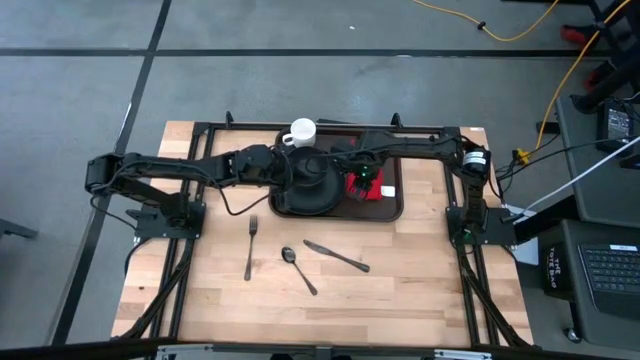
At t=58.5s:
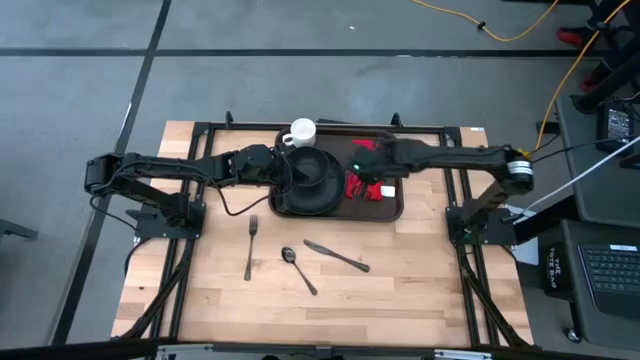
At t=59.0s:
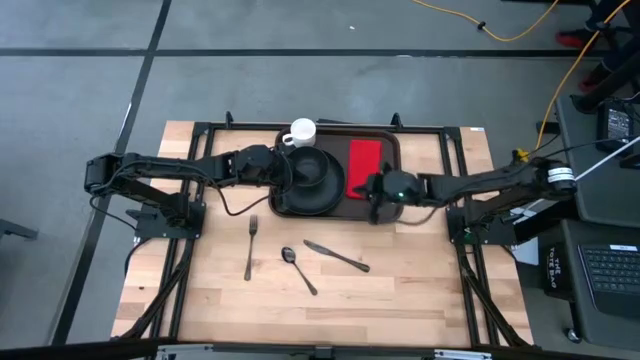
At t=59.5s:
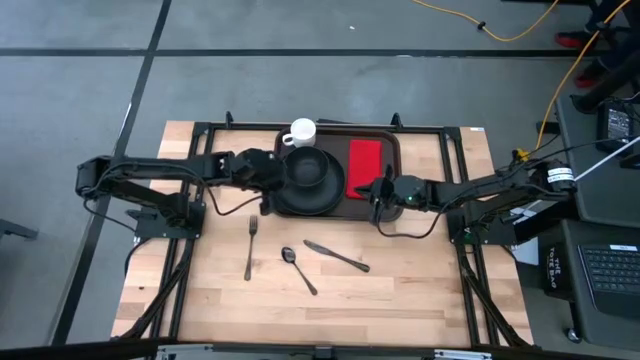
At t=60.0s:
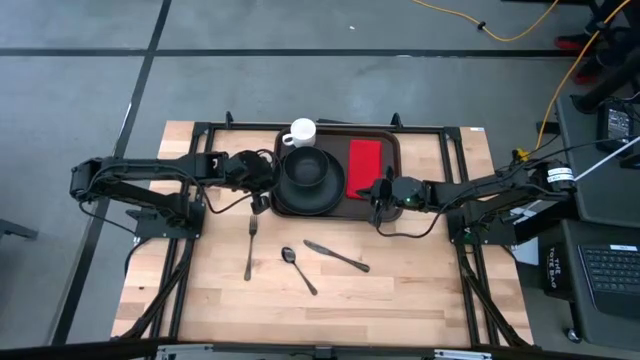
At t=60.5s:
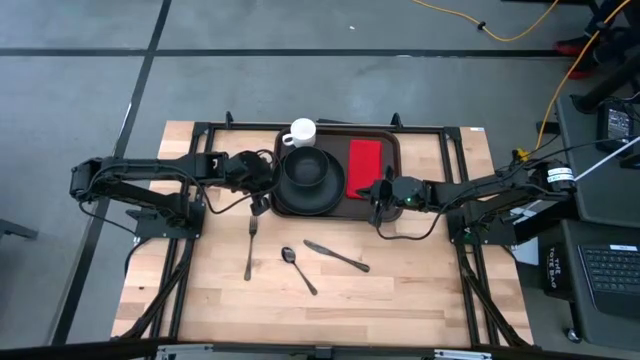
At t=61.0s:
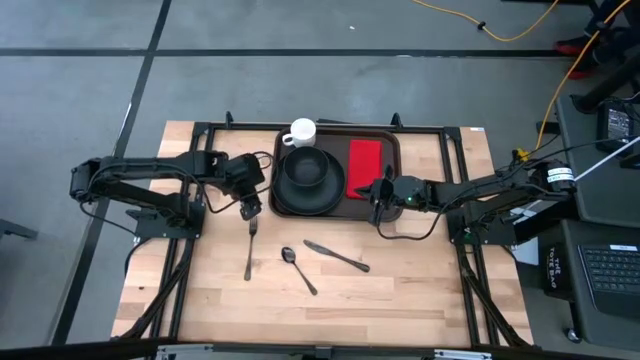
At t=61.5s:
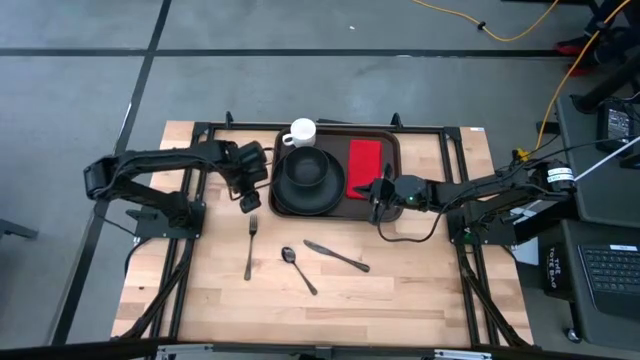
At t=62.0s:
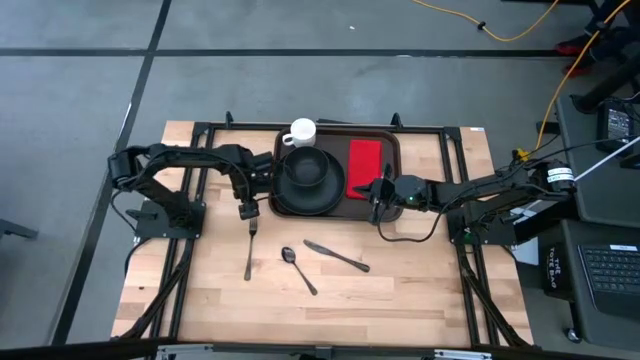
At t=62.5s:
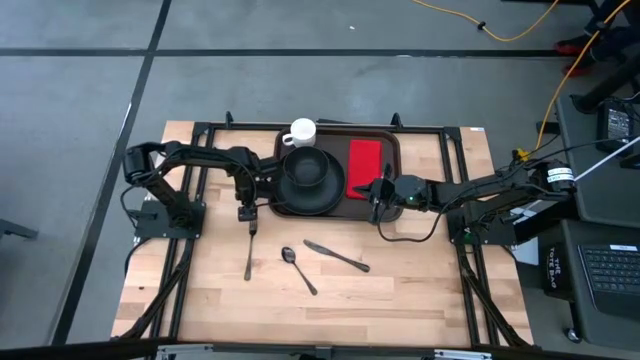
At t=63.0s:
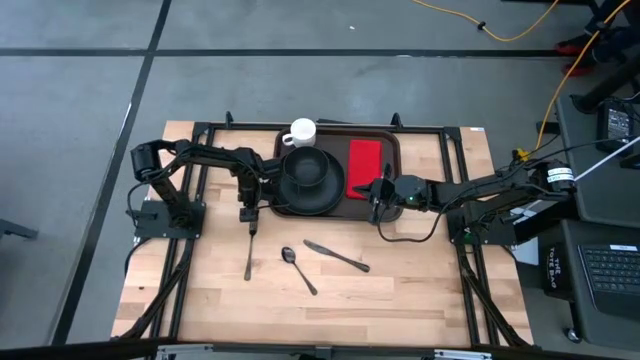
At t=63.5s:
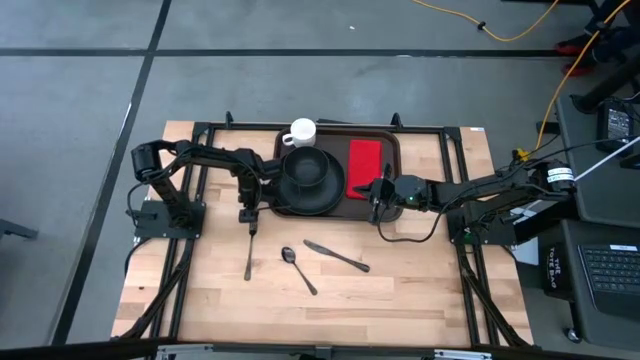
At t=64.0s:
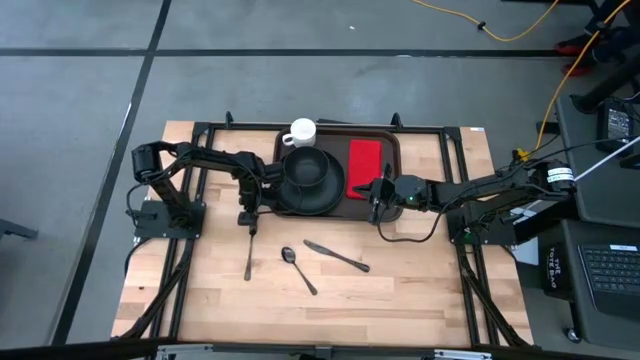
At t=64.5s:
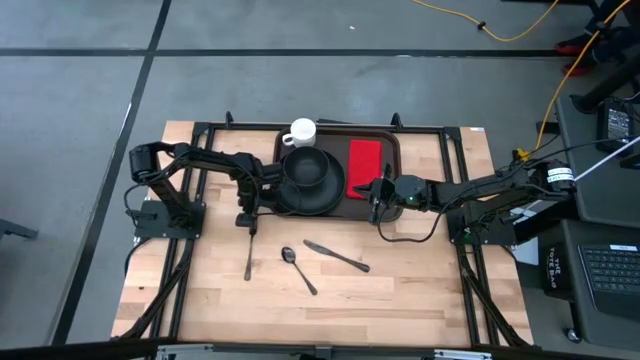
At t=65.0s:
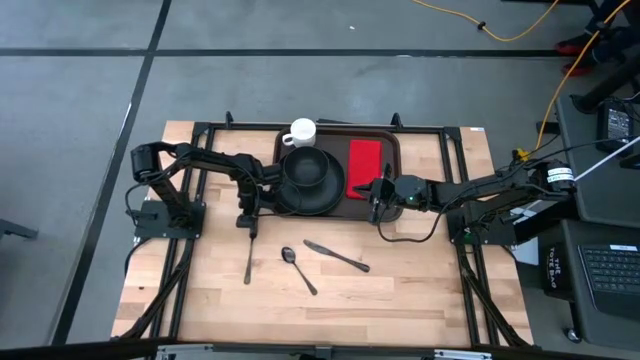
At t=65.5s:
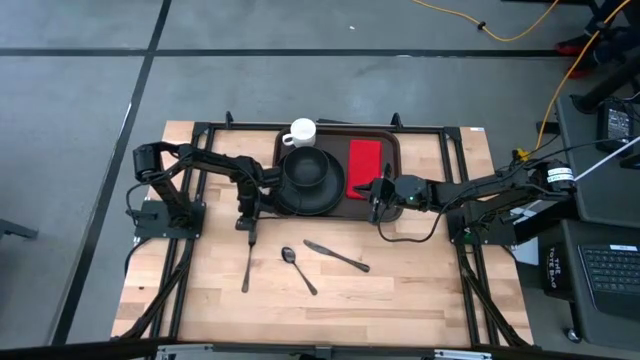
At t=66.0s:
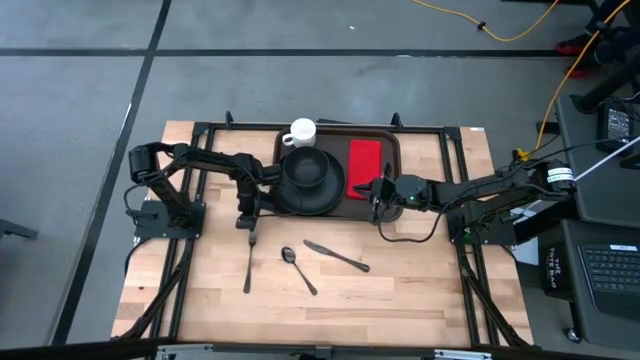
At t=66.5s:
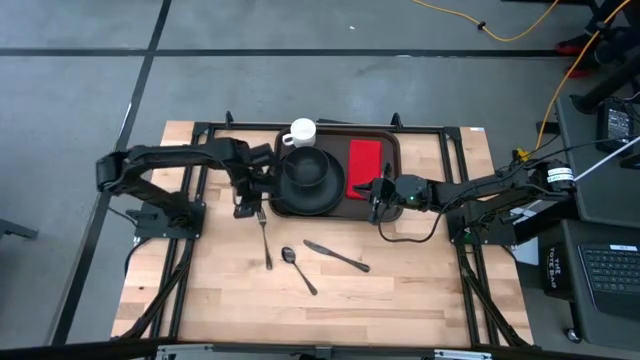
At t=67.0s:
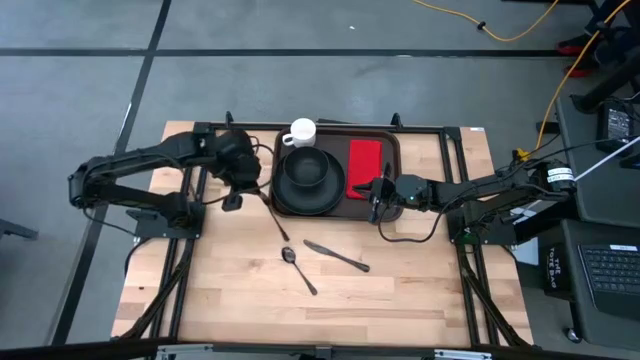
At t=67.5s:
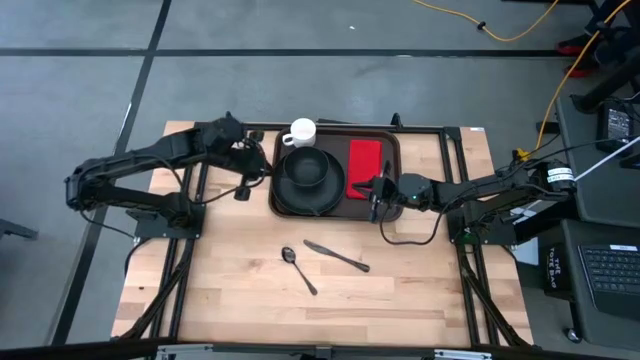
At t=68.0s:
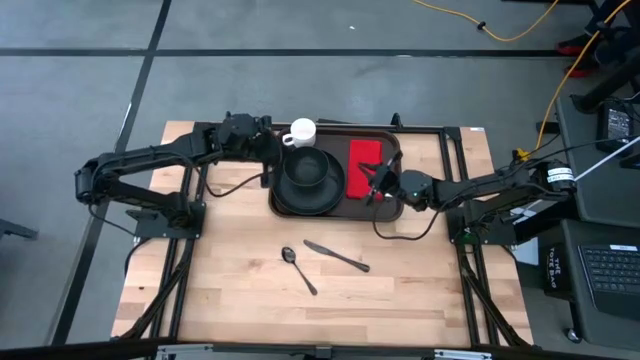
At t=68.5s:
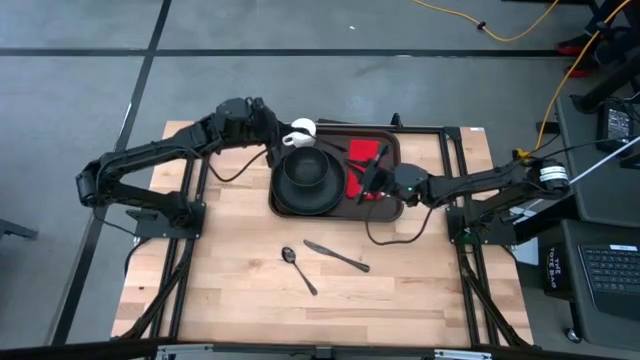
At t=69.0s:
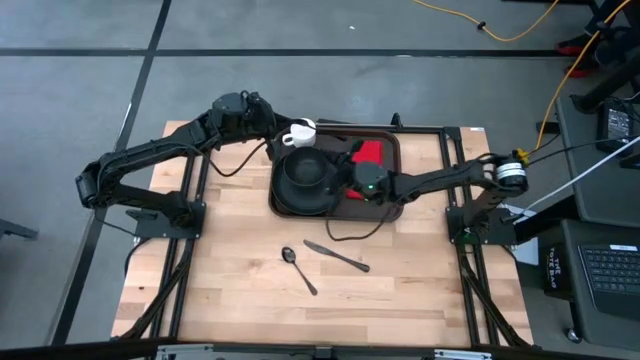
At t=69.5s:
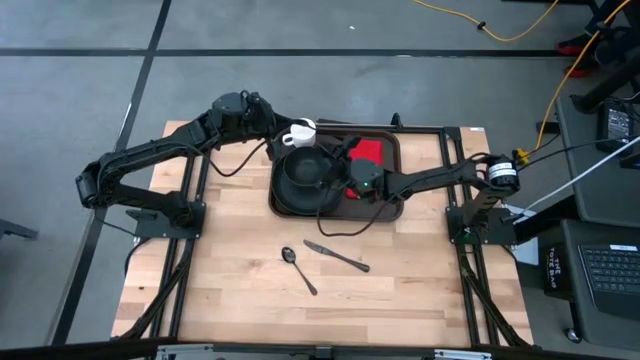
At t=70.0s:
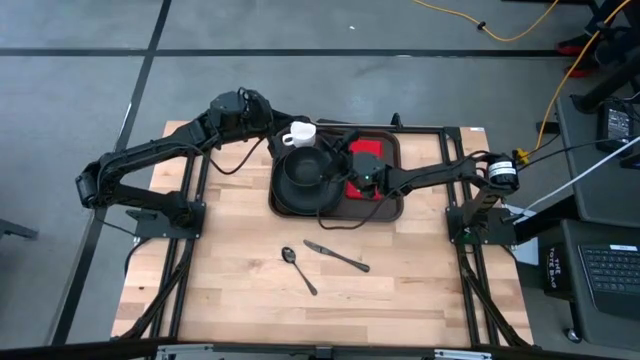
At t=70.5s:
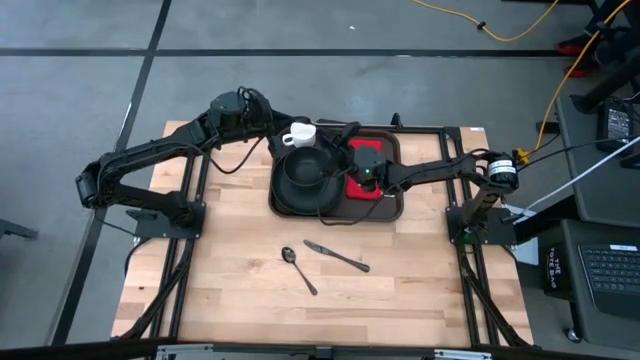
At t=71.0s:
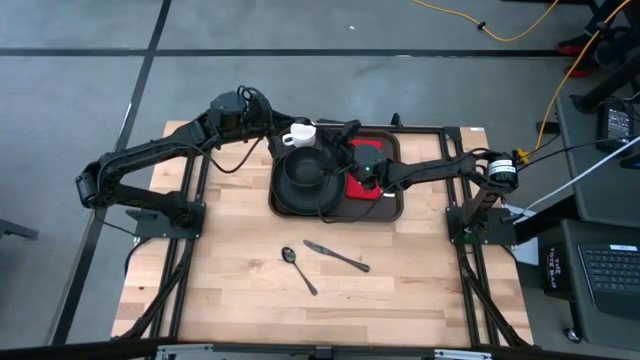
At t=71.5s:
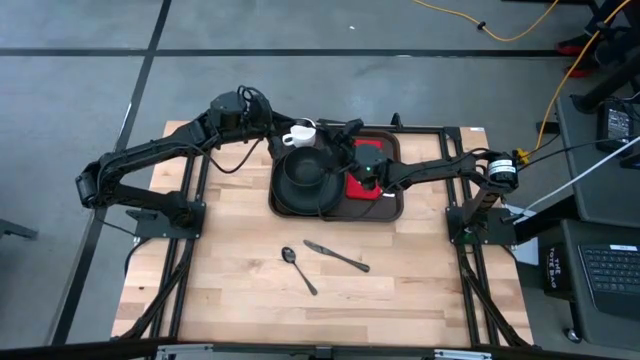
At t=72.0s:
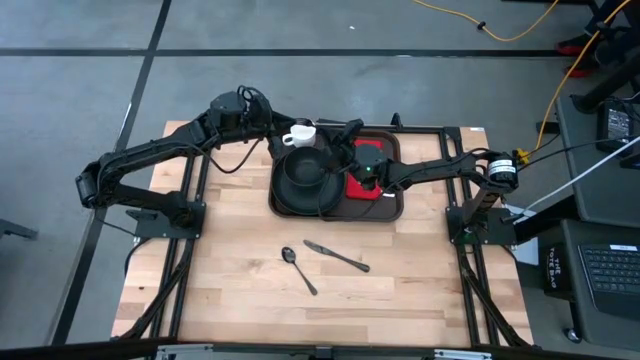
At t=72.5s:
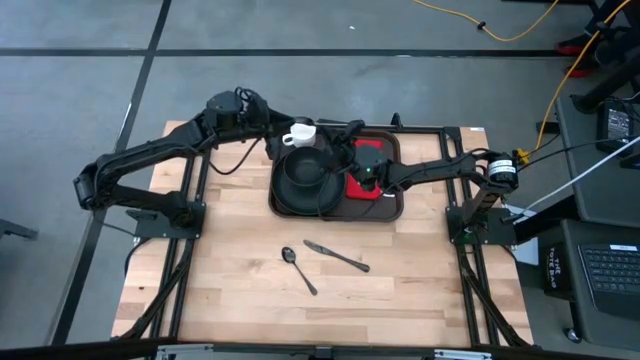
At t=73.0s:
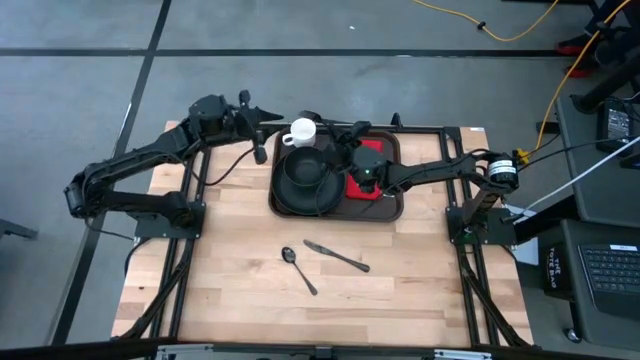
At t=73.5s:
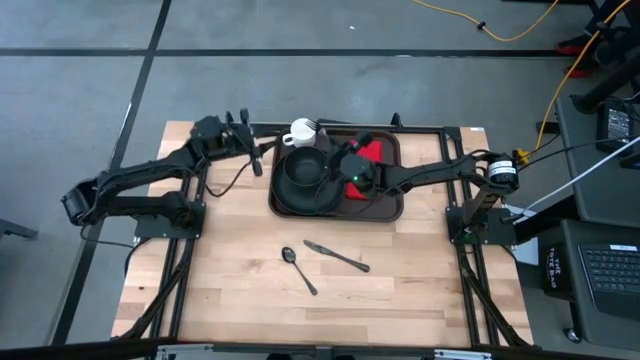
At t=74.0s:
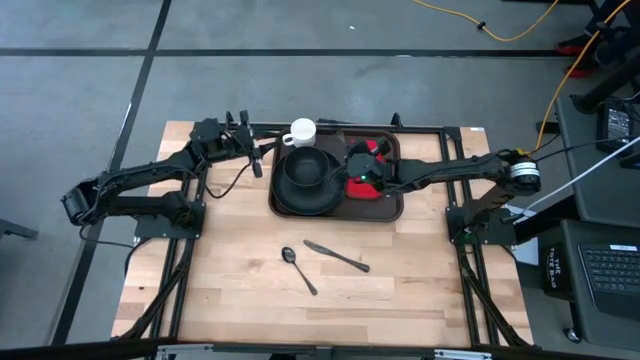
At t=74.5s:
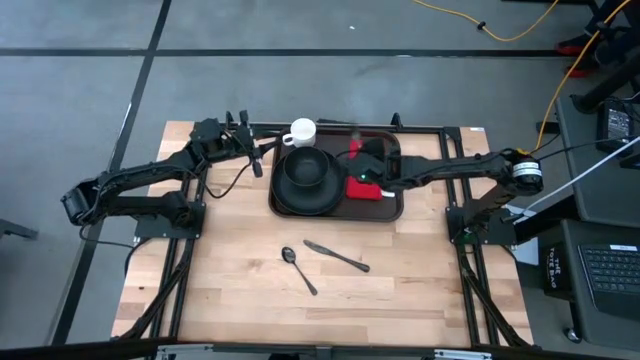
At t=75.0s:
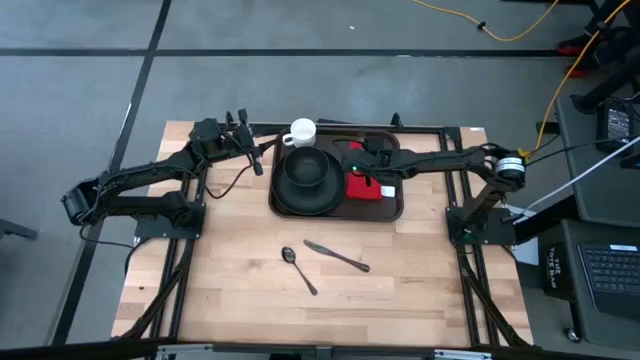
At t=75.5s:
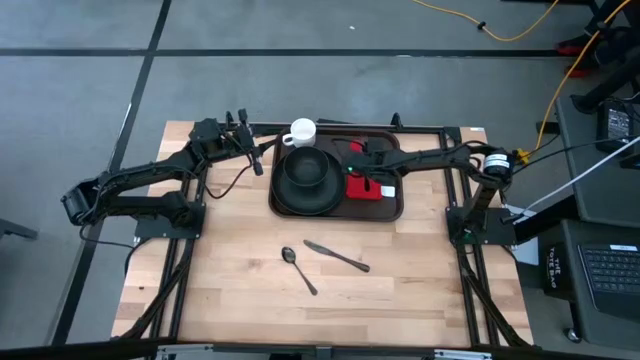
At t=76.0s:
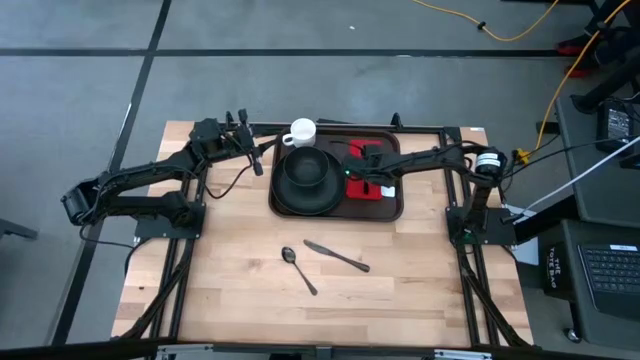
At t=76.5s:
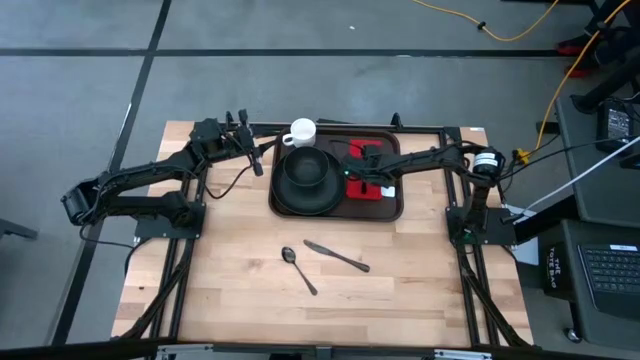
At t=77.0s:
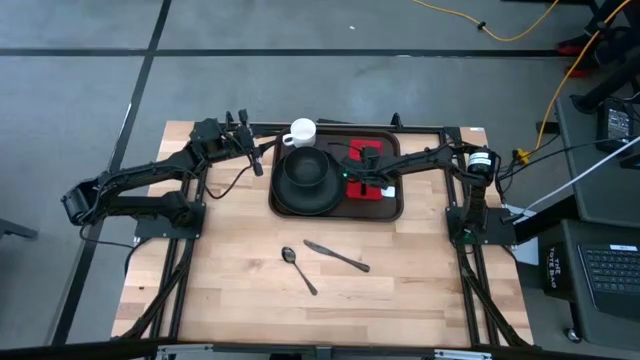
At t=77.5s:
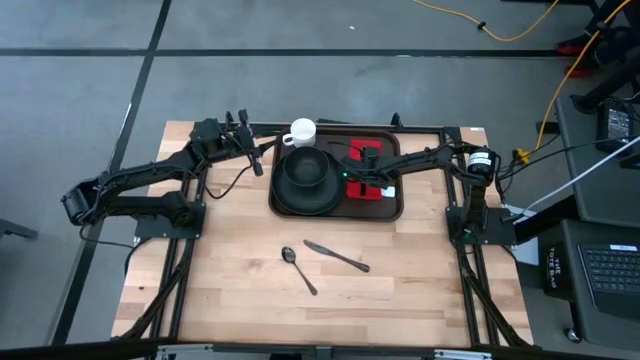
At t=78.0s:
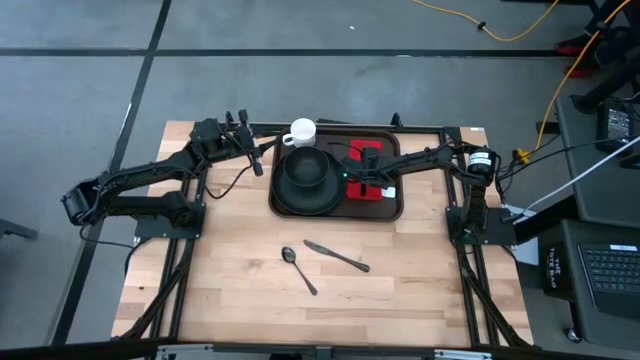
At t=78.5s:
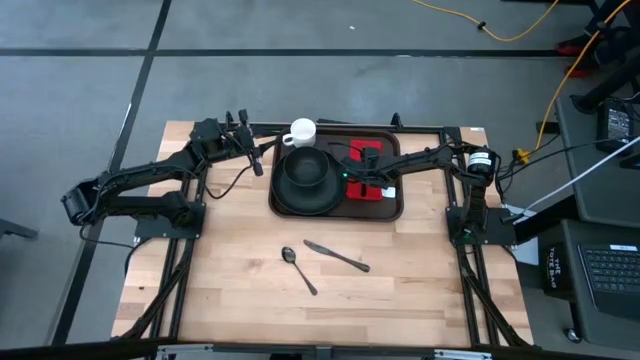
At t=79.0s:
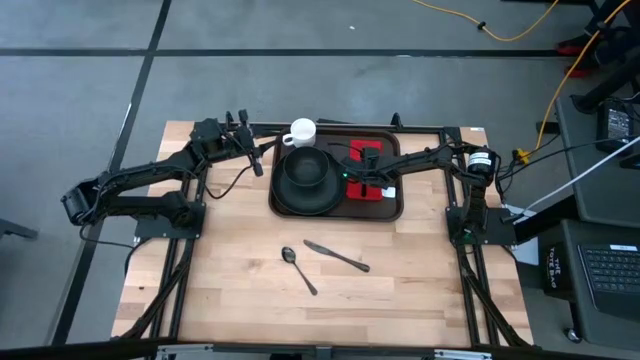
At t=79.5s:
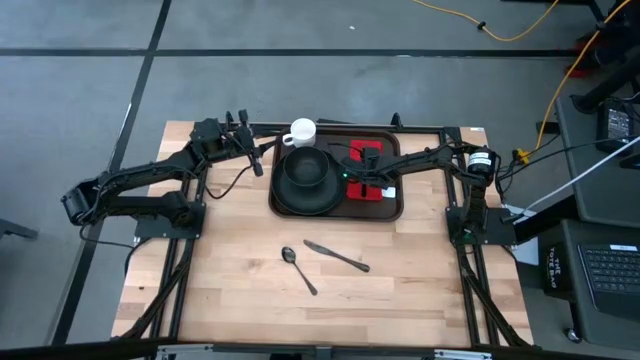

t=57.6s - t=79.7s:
Task: Set up tray
Put the black fork on the red table napkin
